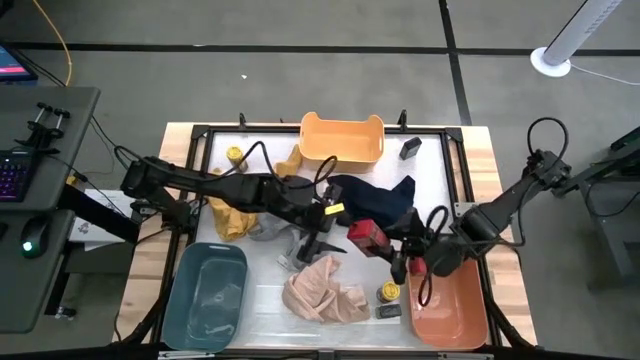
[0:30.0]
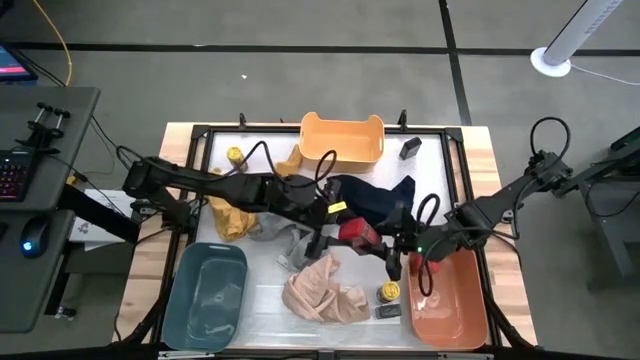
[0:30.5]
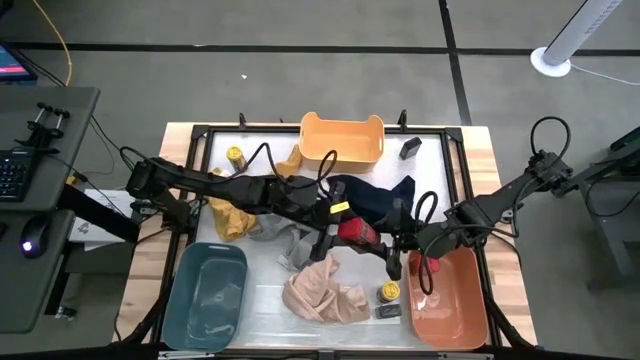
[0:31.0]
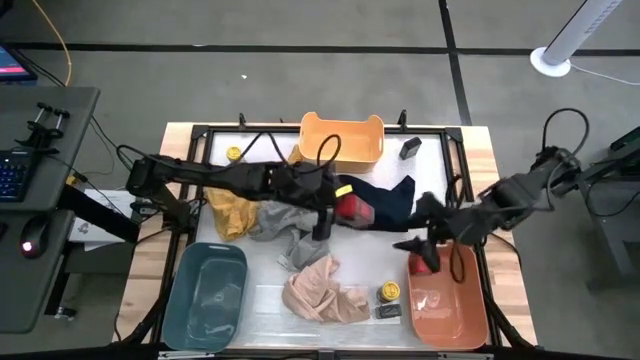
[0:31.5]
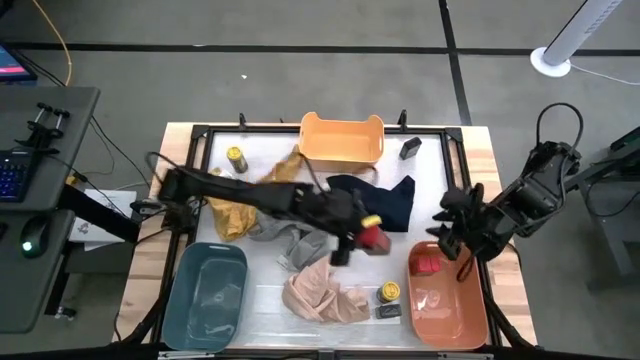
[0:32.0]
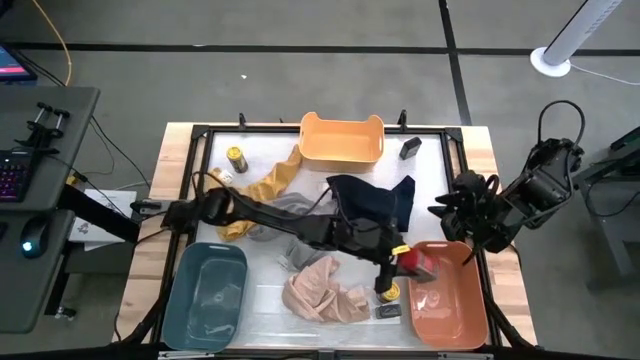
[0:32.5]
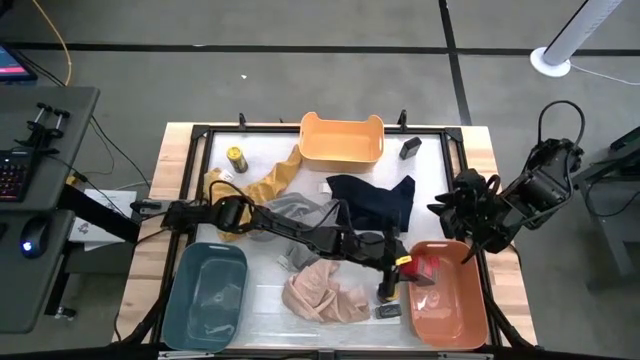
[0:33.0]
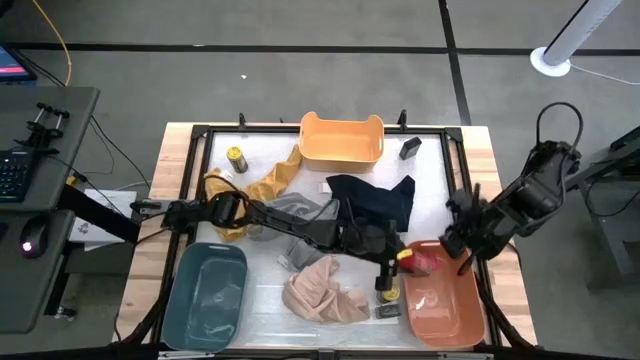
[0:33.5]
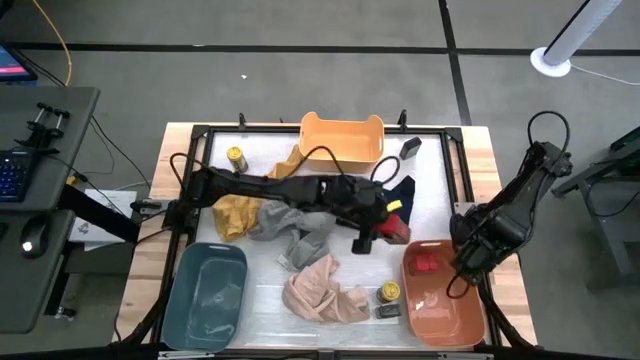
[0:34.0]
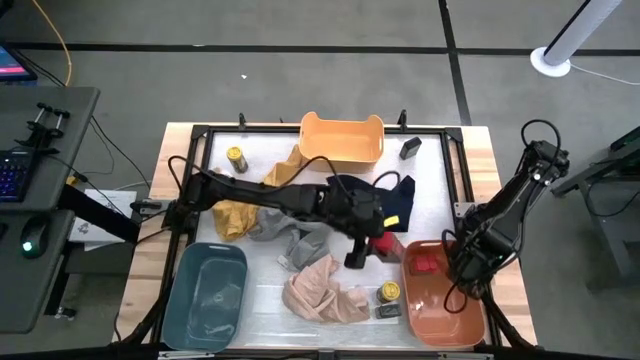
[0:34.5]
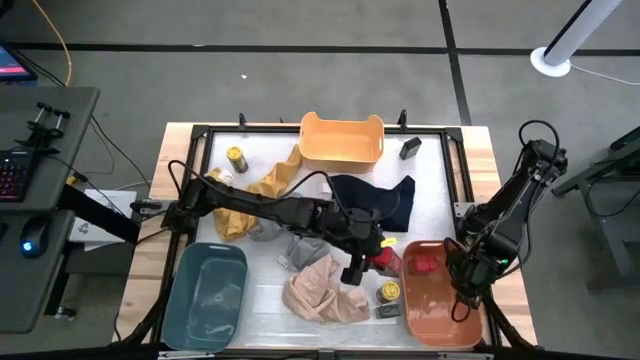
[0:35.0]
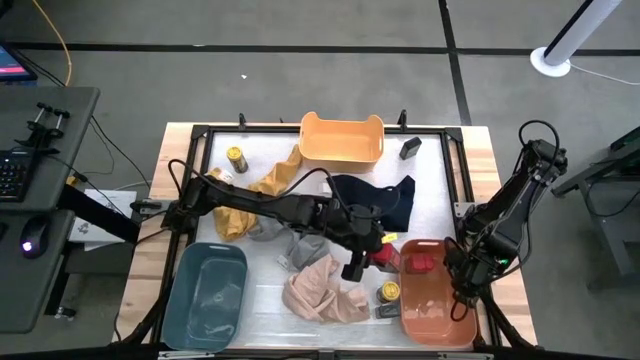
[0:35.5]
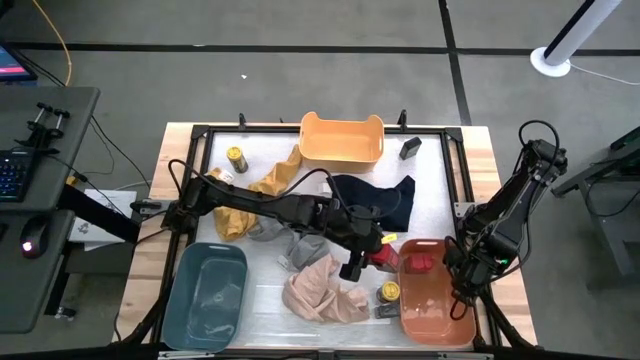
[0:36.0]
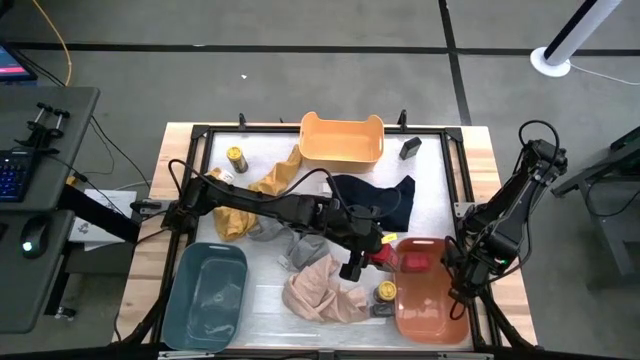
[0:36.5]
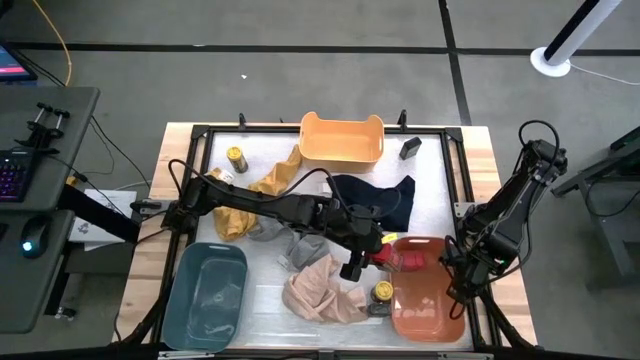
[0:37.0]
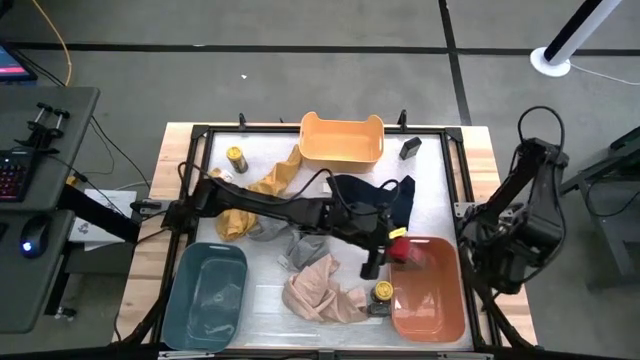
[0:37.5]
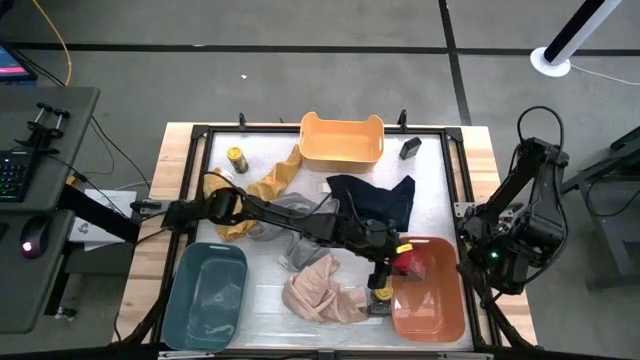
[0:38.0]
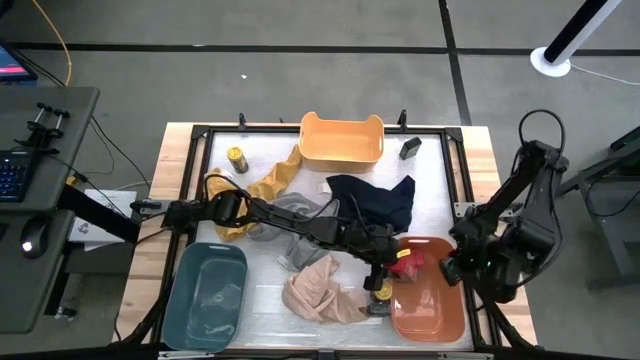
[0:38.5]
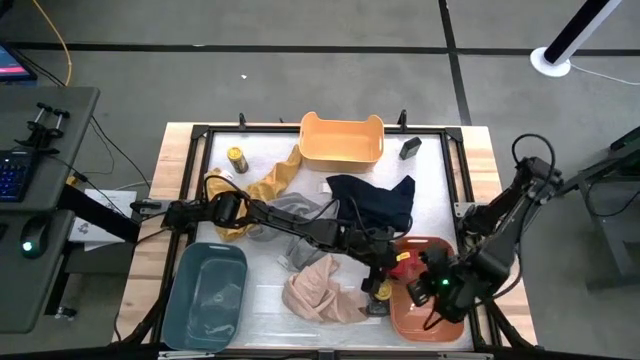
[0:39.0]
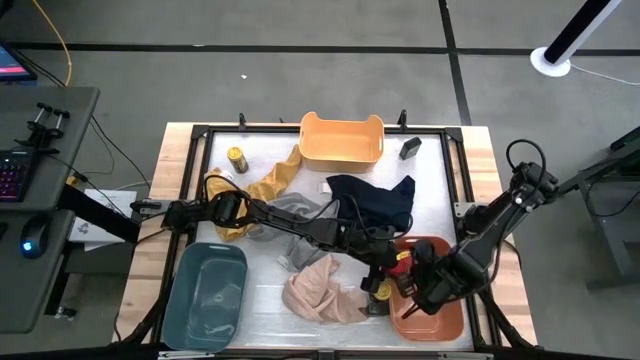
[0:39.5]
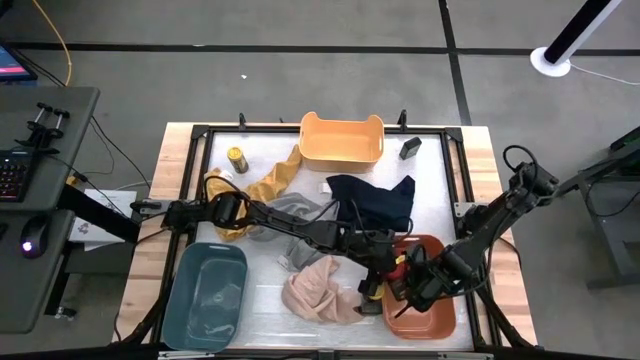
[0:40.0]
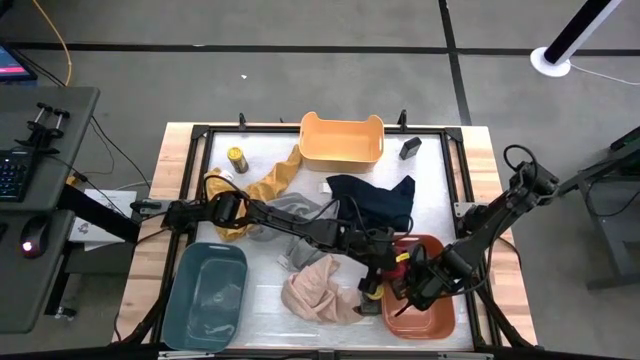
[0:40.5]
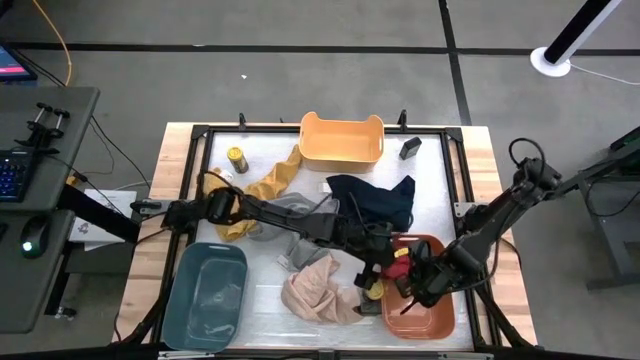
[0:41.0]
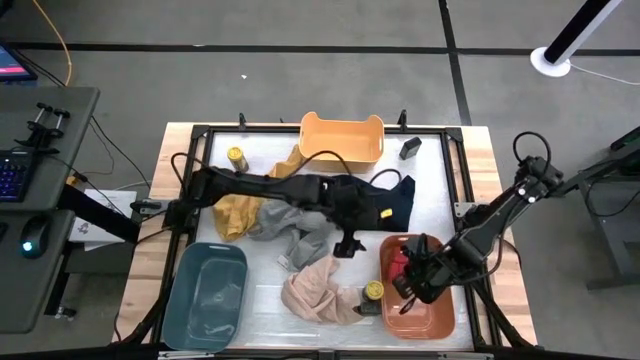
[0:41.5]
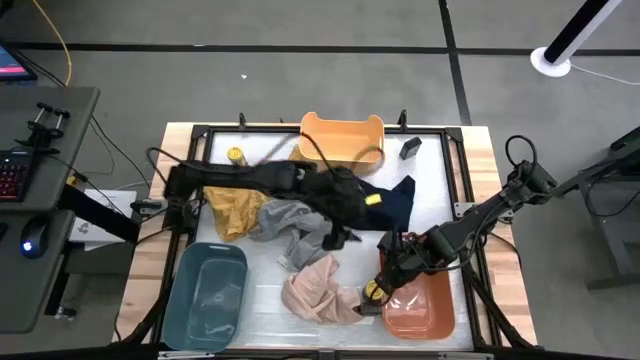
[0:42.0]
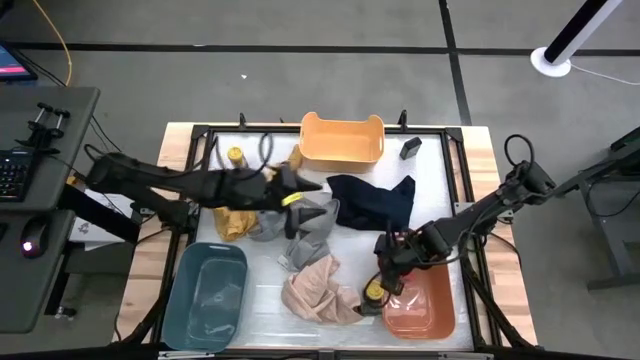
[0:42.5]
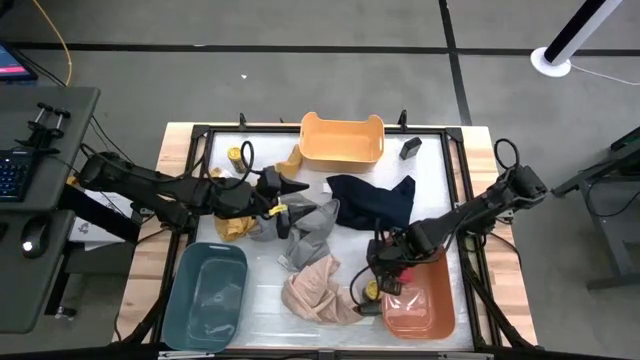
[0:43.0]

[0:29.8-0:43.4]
Task: Sort spices by type
Put the red seasoning can into the orange bin

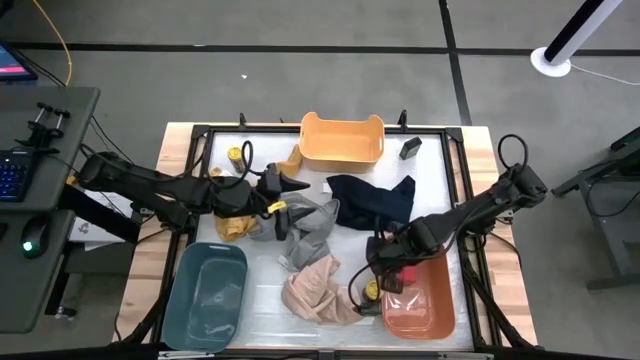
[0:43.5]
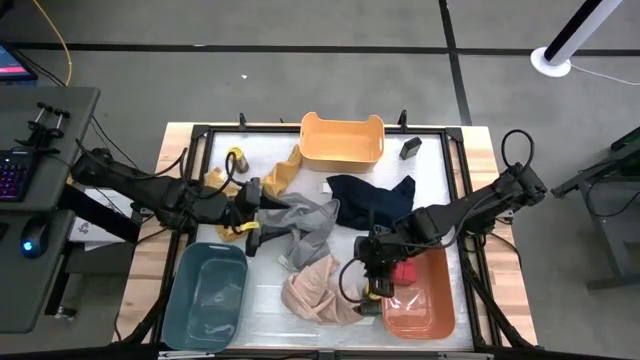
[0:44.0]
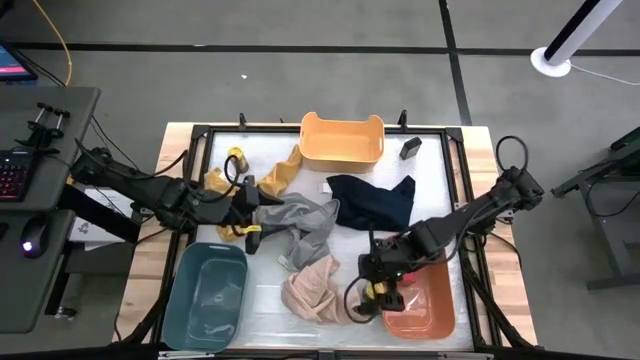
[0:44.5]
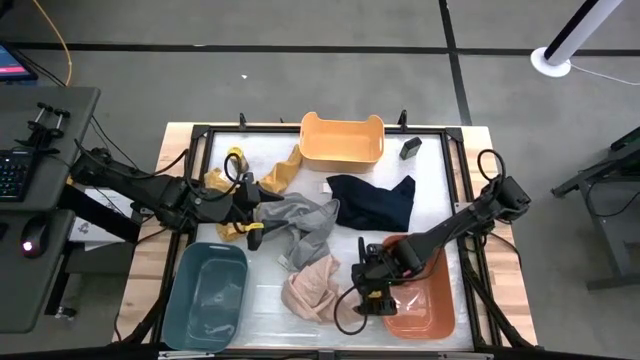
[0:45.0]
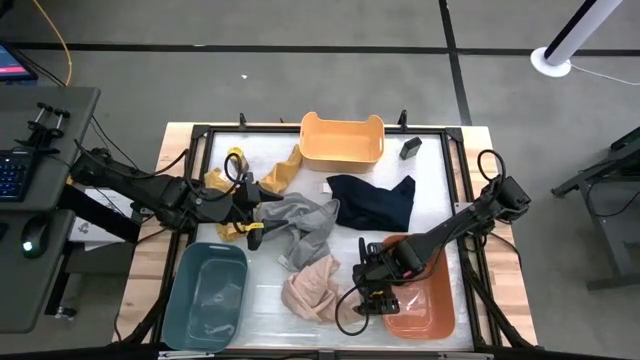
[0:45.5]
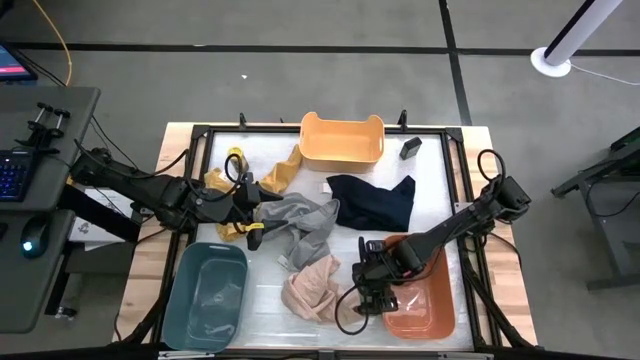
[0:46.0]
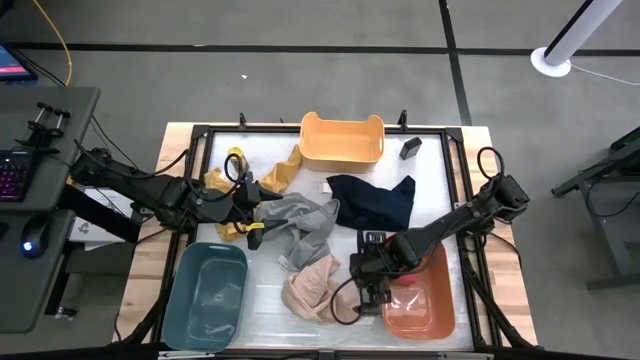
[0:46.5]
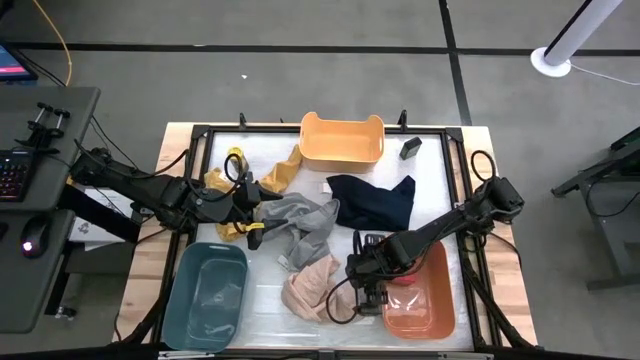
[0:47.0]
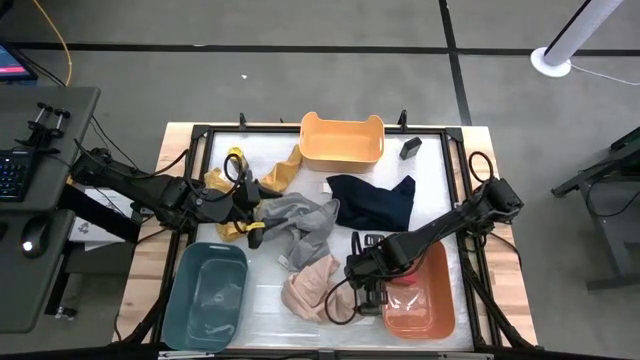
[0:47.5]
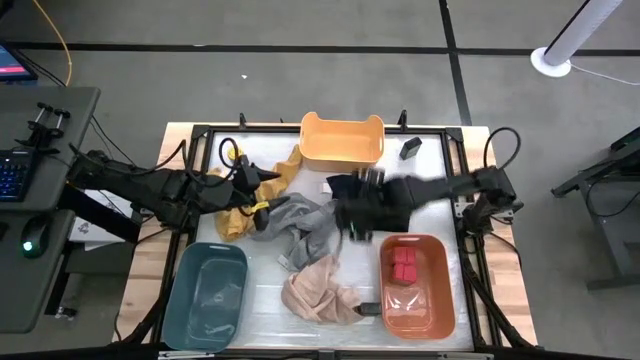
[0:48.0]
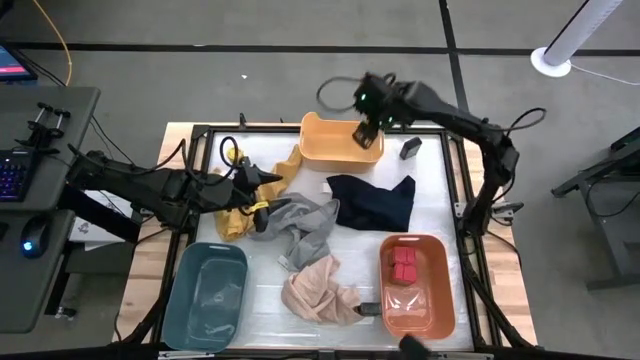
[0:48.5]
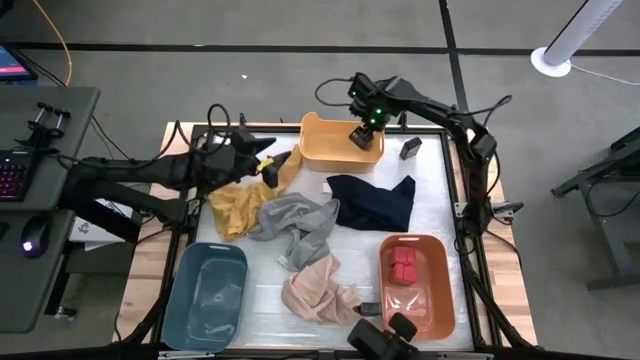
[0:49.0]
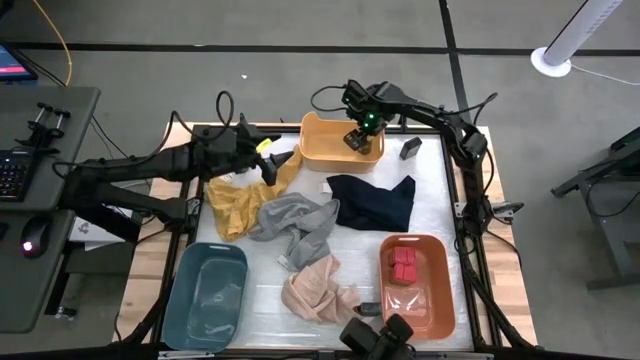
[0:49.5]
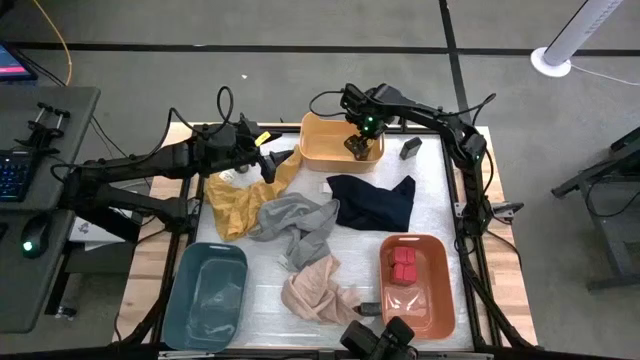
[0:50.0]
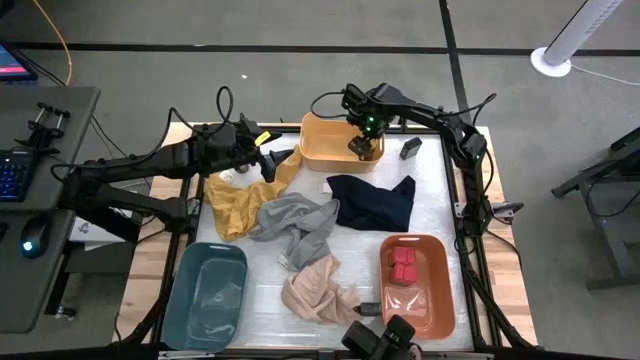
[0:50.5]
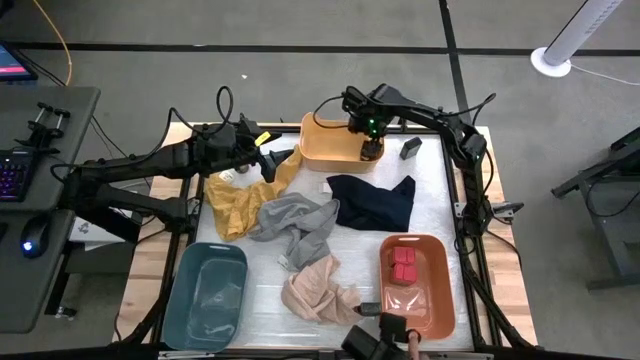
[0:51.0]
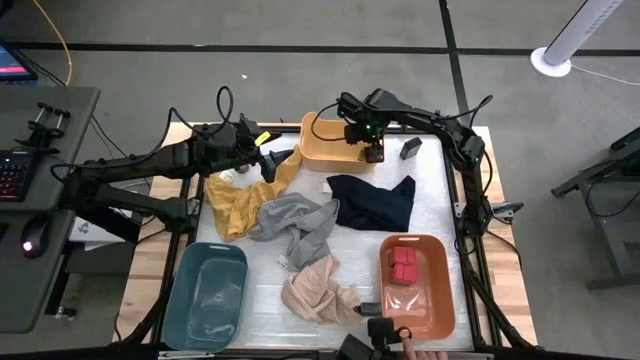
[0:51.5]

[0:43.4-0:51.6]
Put the bottom yellow seasoning bottle into the yellow bin
